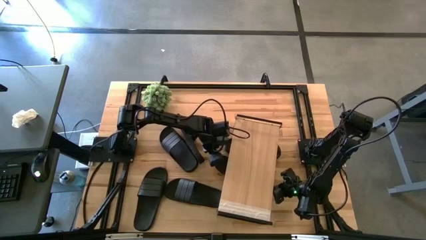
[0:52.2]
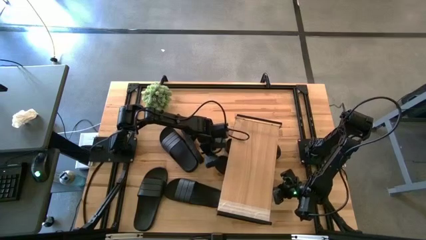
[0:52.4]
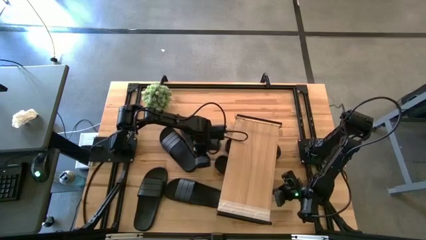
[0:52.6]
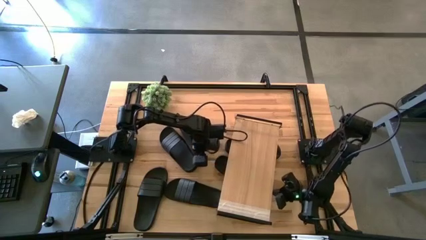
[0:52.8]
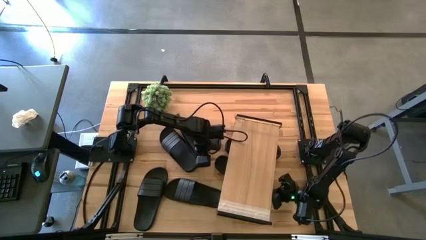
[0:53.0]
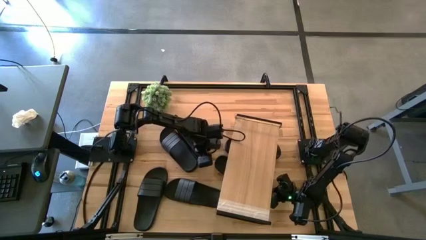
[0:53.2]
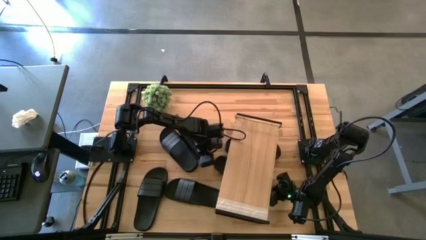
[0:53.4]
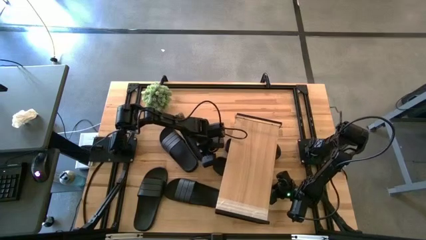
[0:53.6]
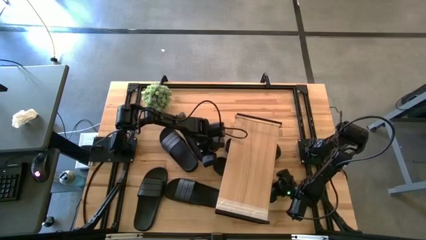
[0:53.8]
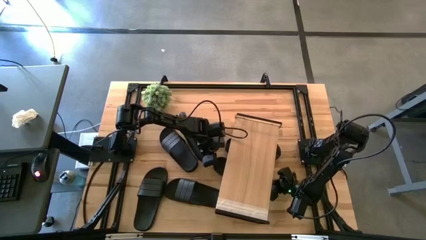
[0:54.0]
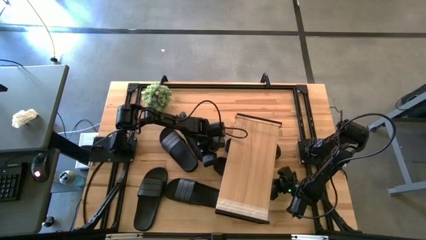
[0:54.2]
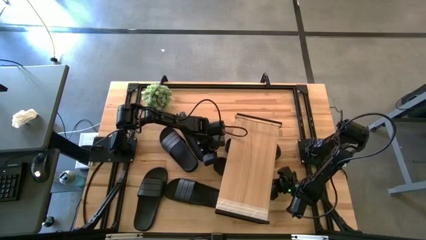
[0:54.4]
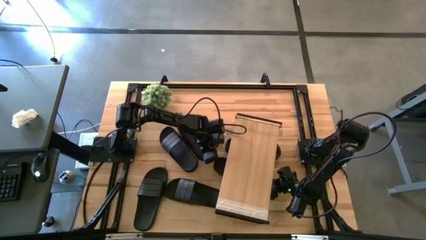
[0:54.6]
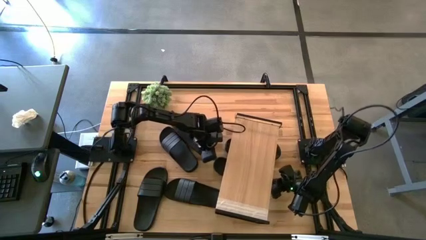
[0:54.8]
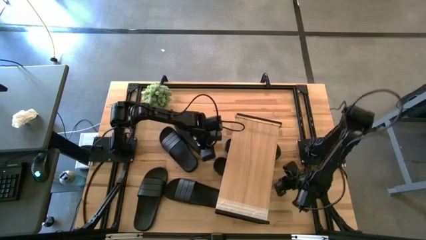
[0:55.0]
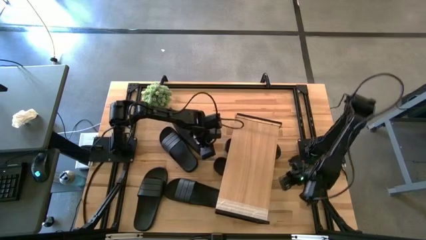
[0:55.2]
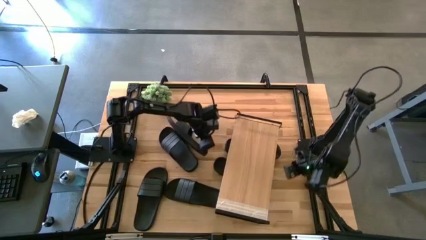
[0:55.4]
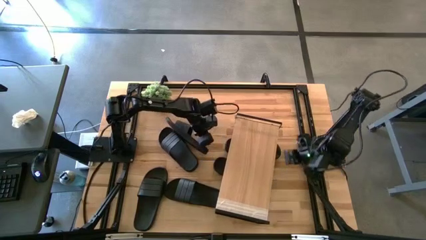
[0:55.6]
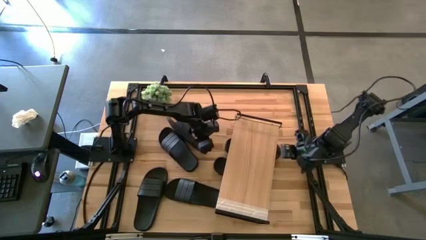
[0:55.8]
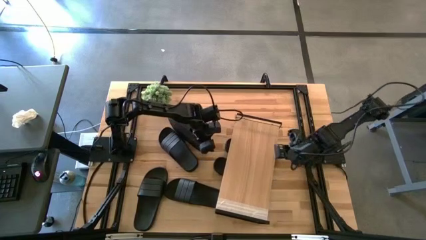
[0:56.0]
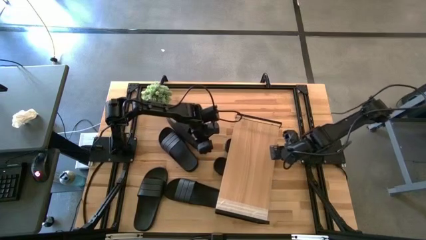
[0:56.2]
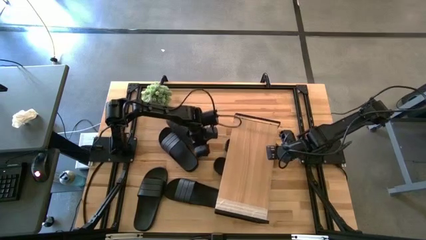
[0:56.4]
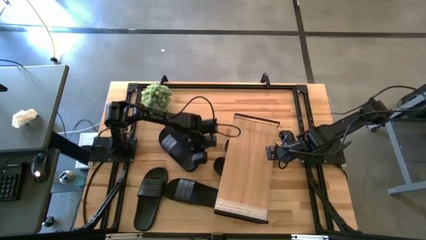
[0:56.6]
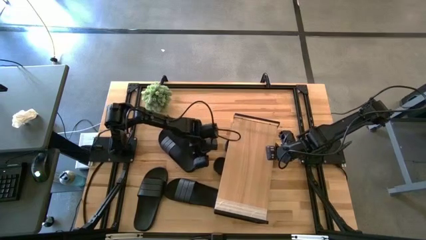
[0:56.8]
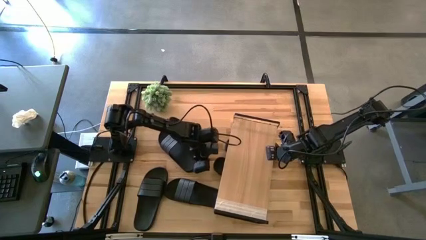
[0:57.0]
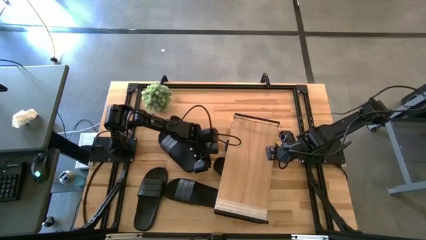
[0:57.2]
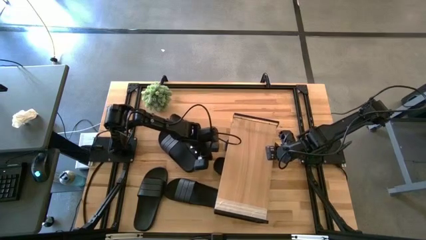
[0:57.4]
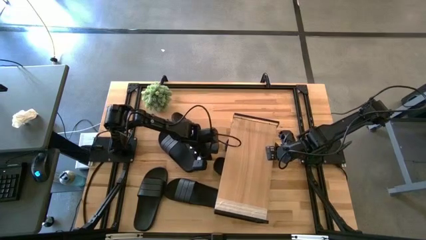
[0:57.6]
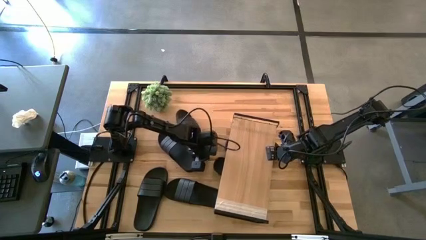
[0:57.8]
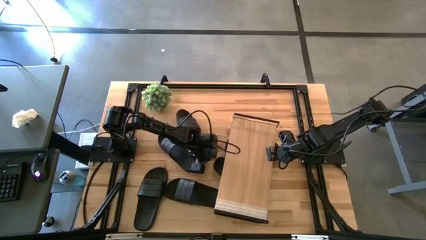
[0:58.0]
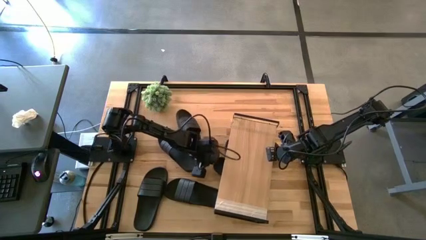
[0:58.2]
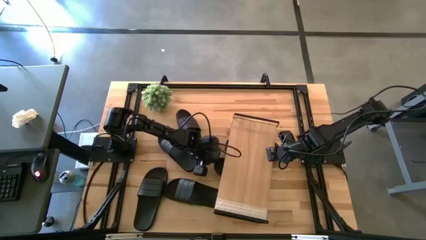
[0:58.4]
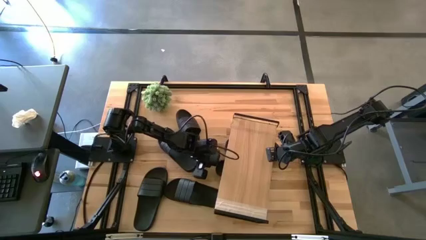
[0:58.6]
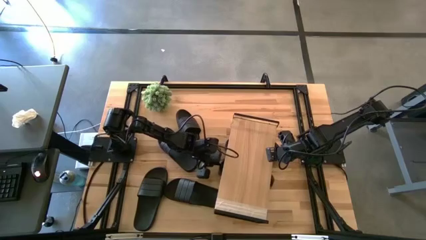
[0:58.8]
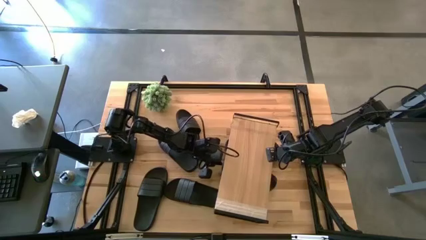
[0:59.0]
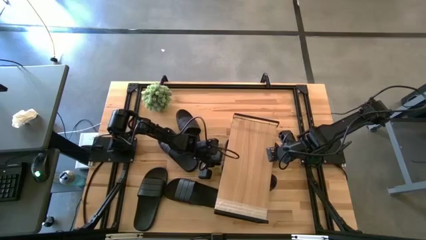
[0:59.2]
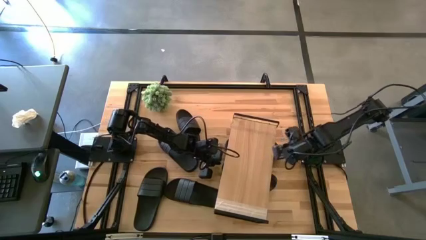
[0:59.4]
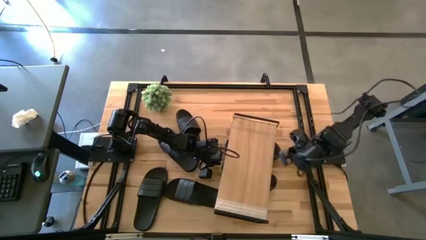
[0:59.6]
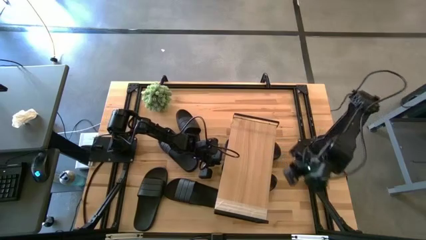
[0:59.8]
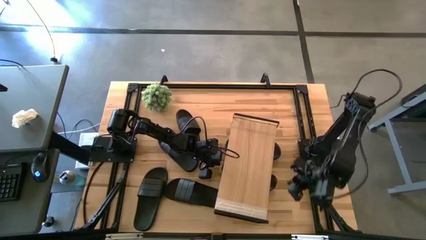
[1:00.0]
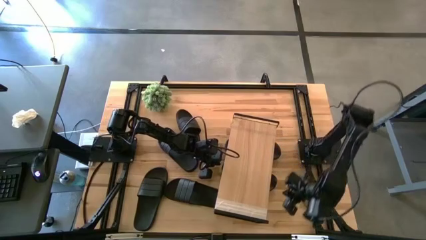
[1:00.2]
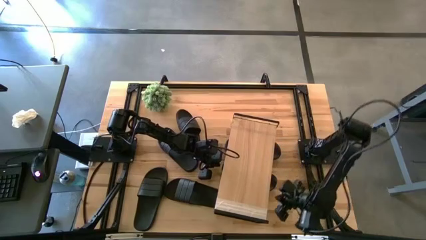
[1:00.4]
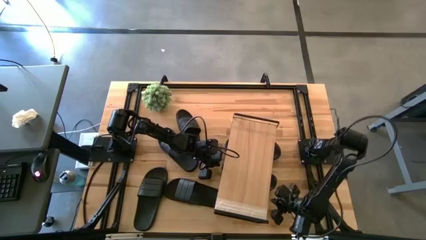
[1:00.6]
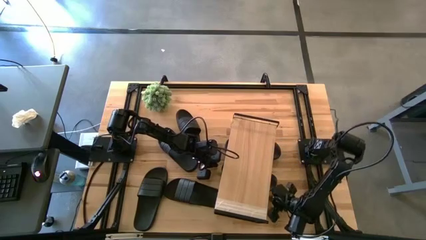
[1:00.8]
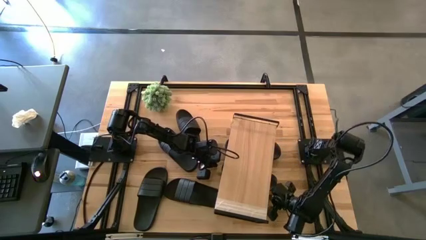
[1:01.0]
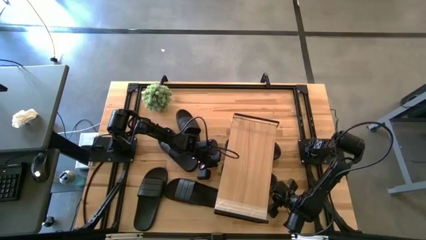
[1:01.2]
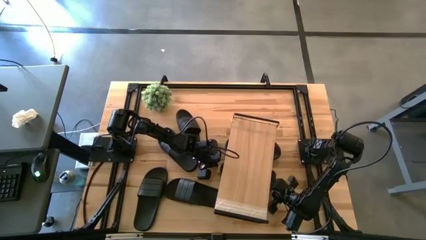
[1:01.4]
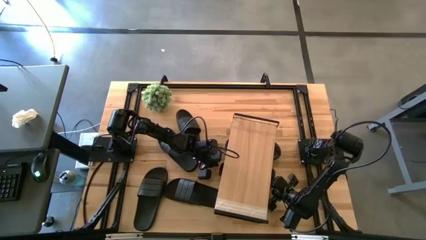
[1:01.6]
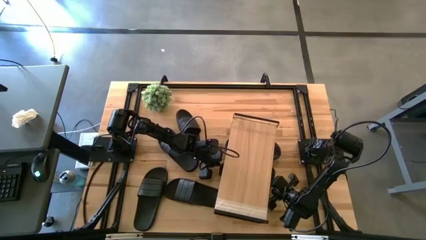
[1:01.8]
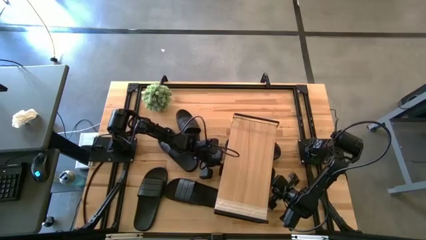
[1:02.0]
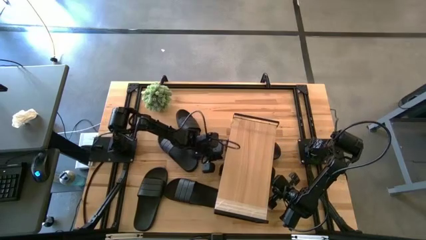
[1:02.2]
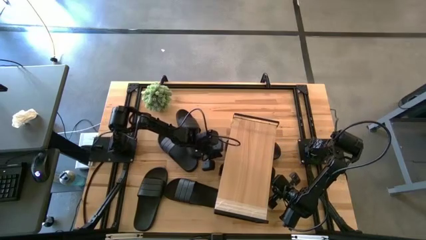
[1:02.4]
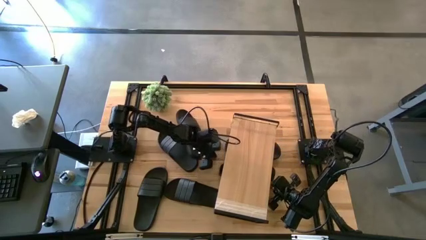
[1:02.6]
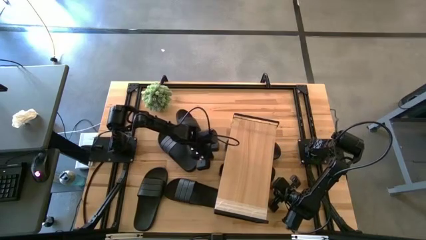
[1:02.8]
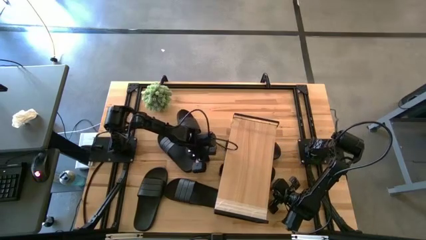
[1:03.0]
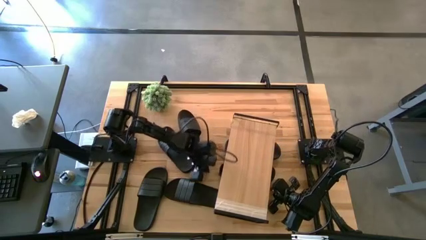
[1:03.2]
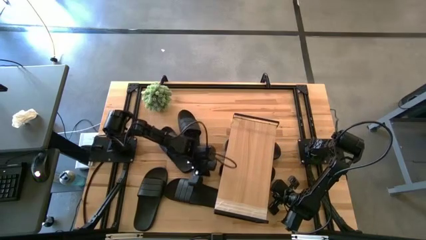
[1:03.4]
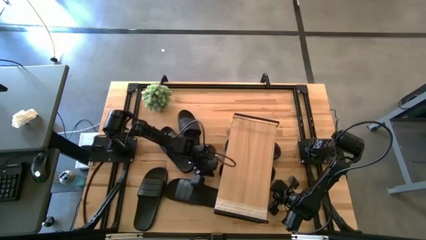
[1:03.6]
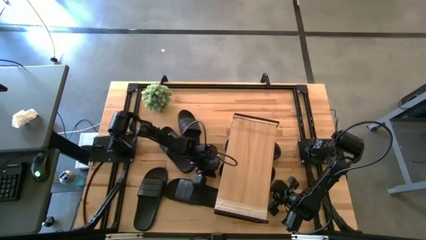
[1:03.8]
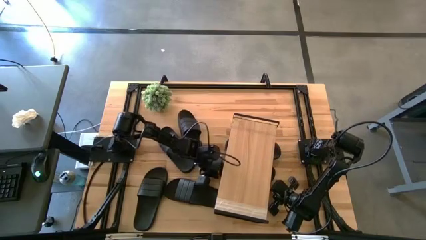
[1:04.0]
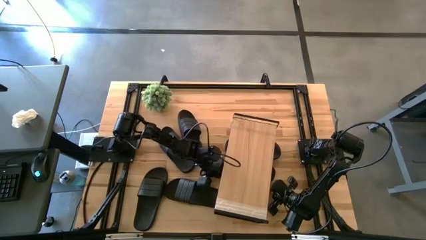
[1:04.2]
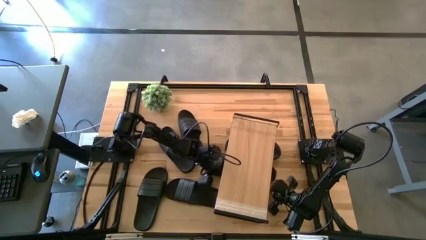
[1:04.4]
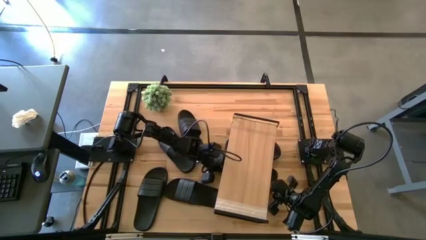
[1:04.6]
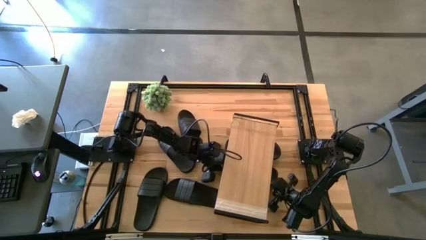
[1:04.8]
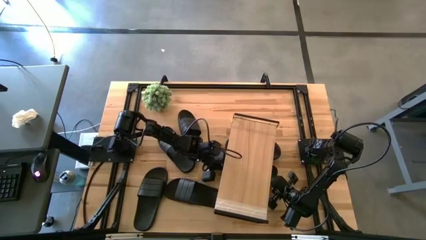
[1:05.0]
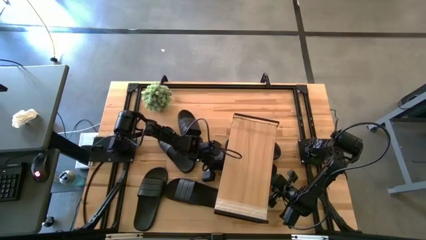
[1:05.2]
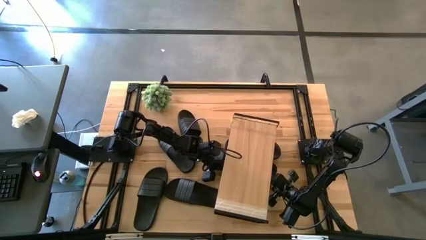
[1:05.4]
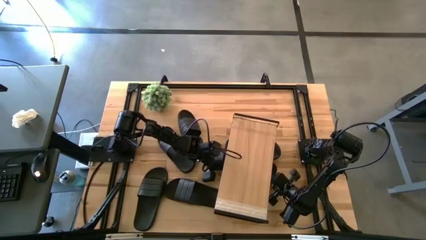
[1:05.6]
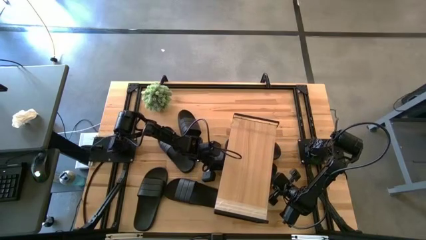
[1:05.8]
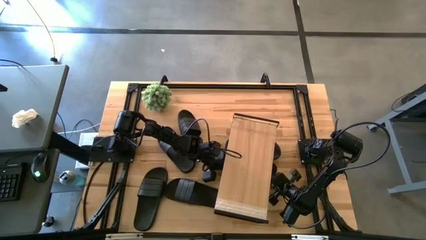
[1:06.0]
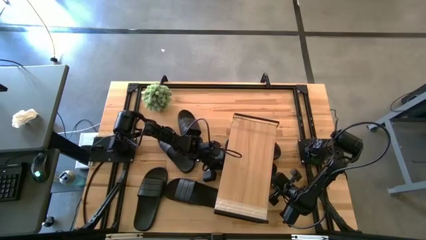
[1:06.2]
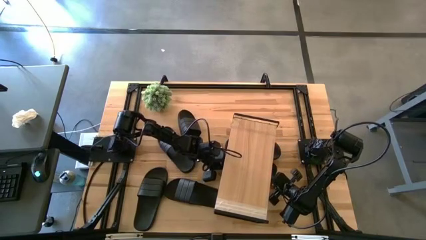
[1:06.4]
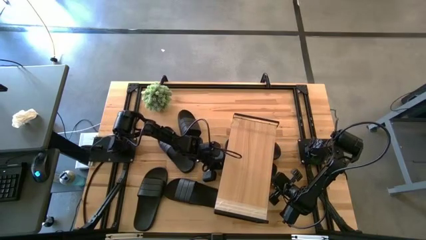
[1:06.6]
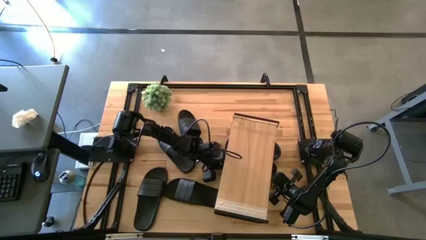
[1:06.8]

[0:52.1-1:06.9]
Task: Pick and place slides into the shelf
Put the black slide under the shelf
